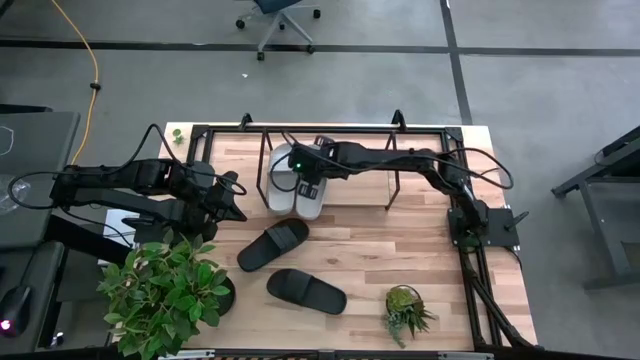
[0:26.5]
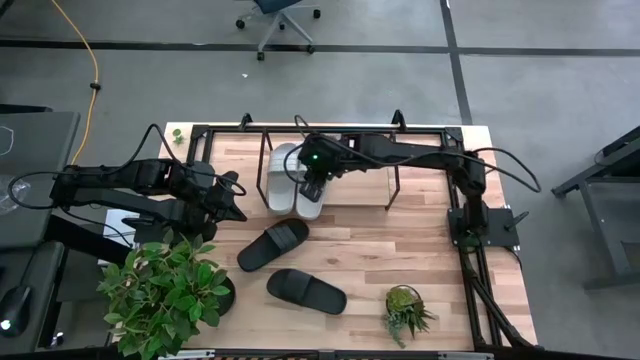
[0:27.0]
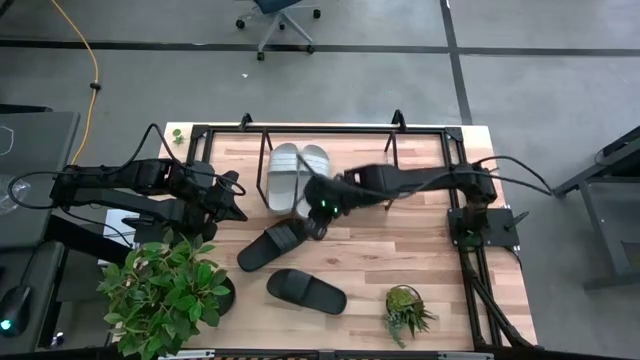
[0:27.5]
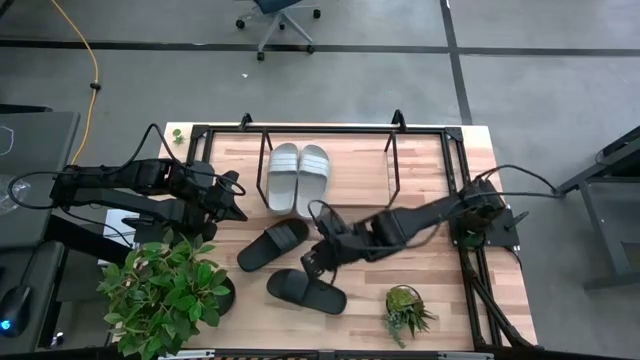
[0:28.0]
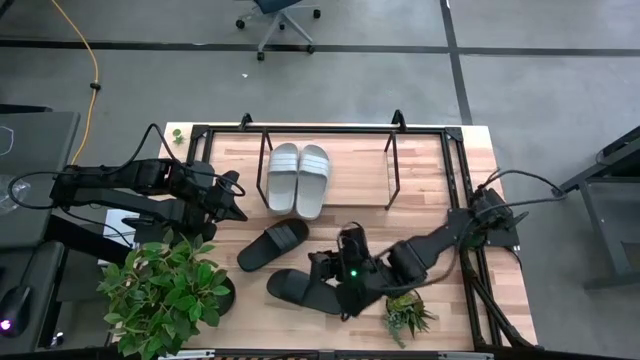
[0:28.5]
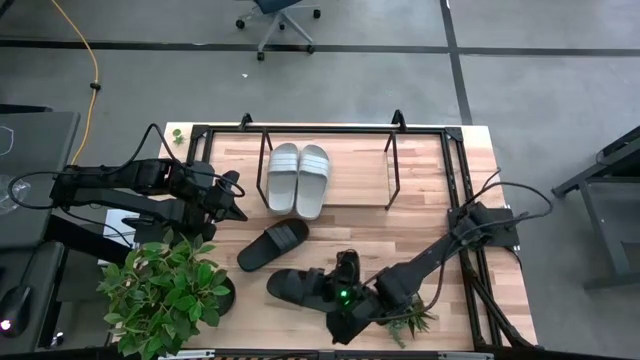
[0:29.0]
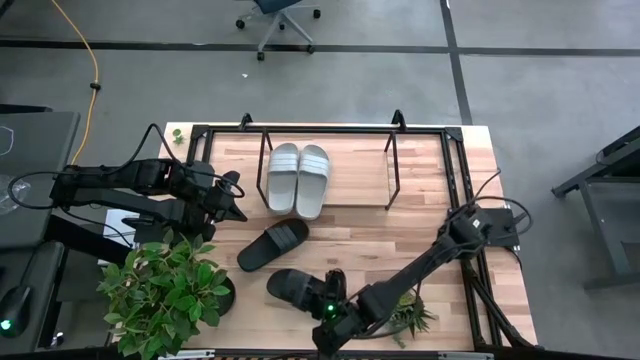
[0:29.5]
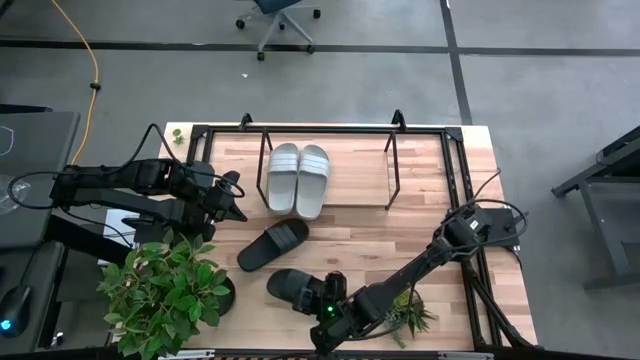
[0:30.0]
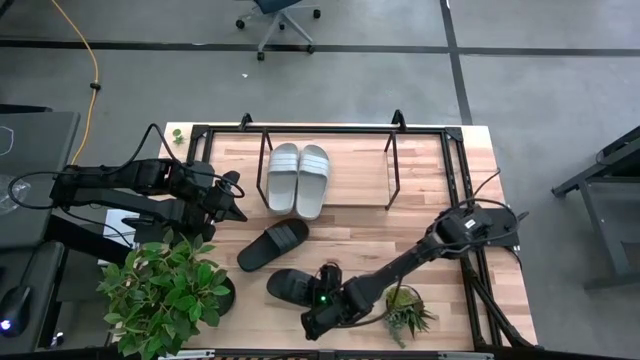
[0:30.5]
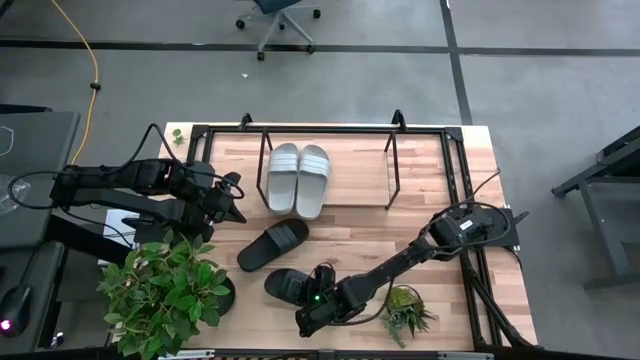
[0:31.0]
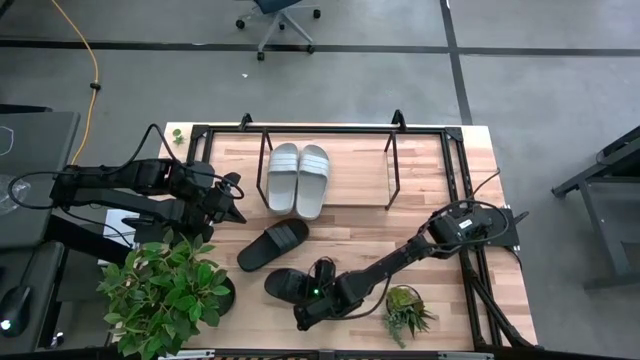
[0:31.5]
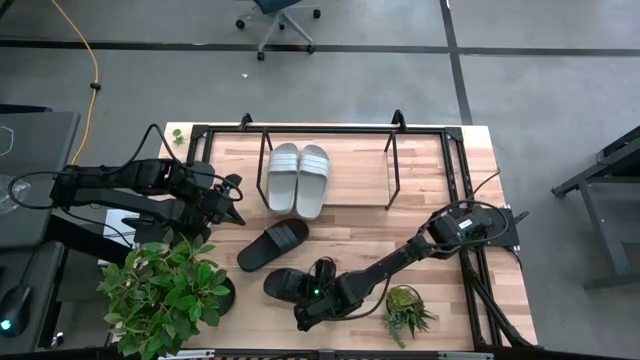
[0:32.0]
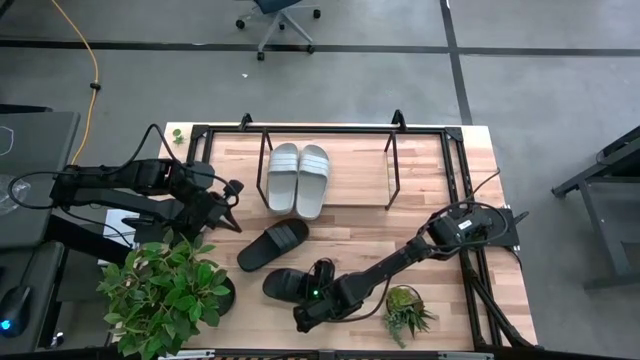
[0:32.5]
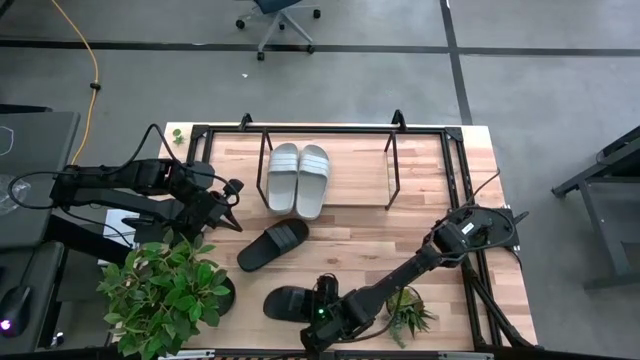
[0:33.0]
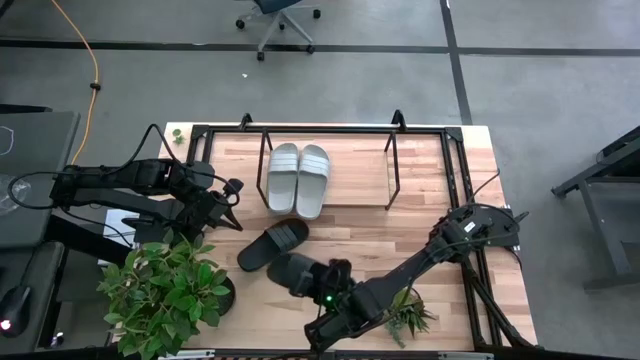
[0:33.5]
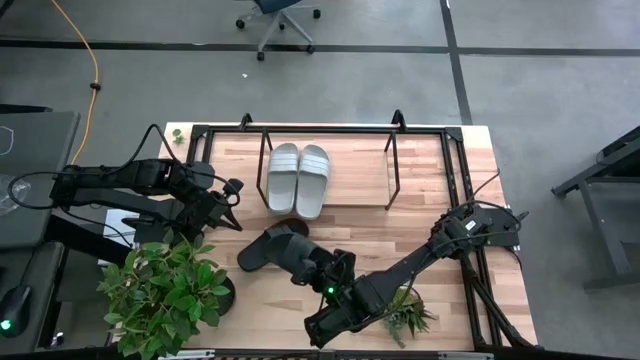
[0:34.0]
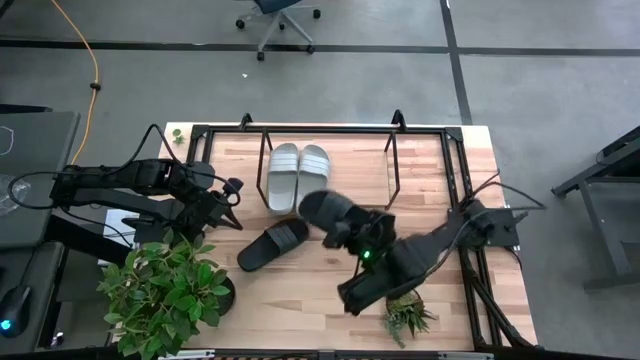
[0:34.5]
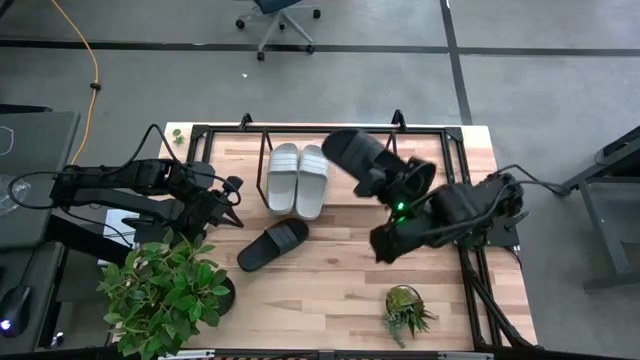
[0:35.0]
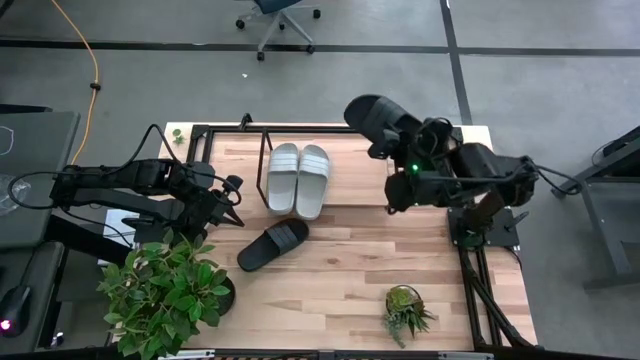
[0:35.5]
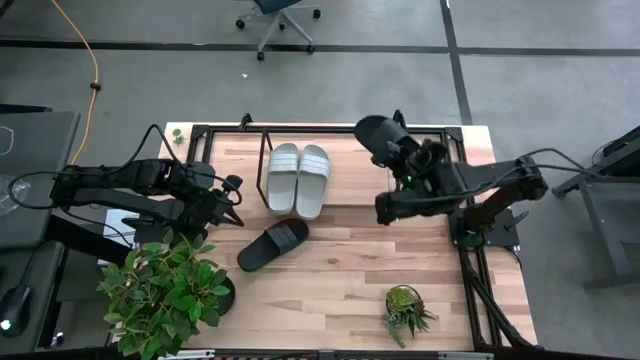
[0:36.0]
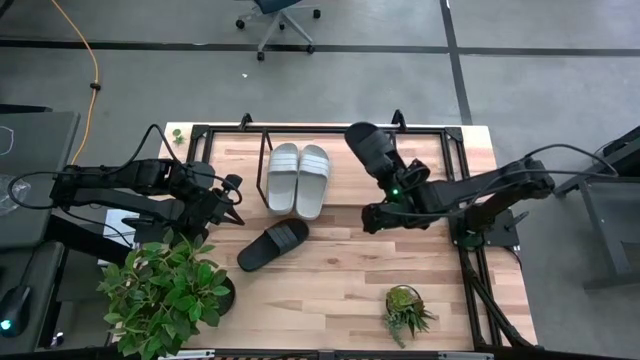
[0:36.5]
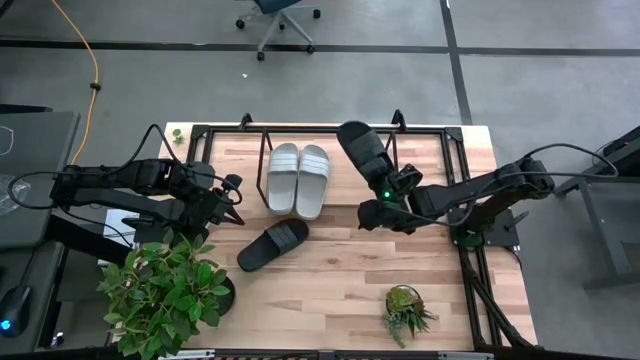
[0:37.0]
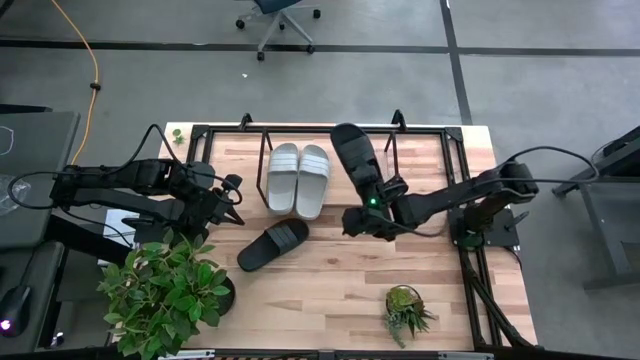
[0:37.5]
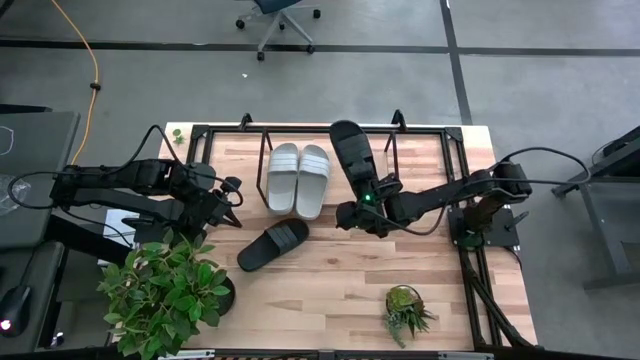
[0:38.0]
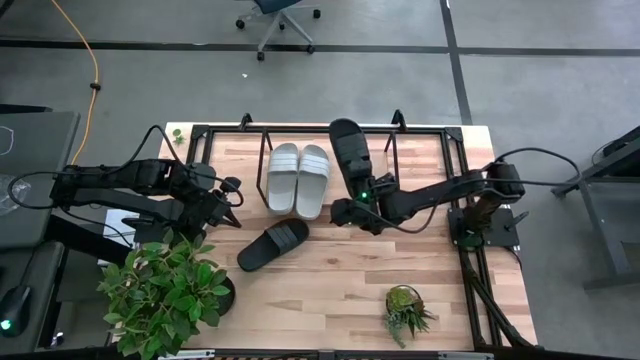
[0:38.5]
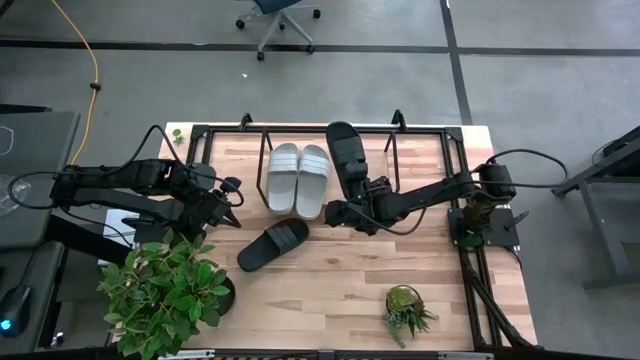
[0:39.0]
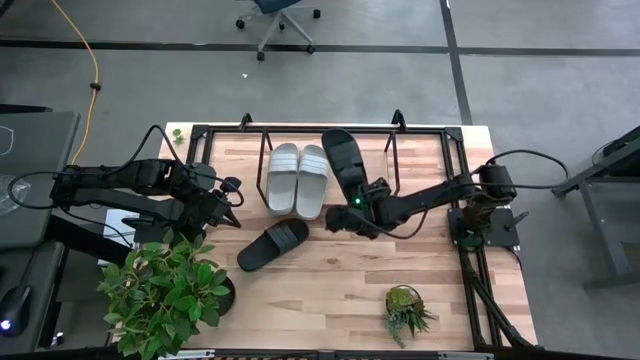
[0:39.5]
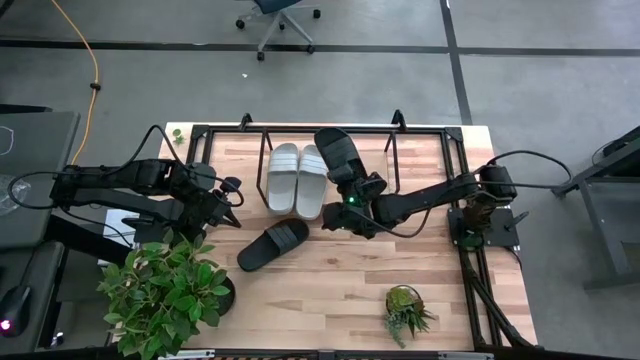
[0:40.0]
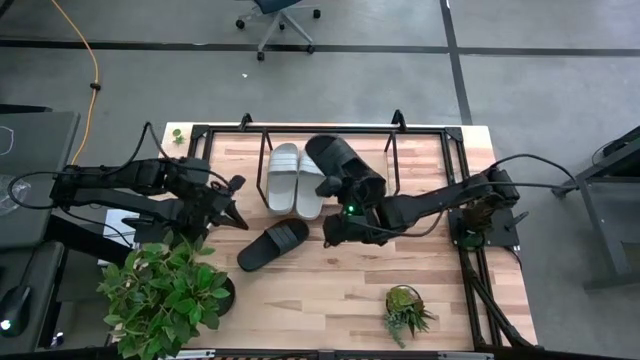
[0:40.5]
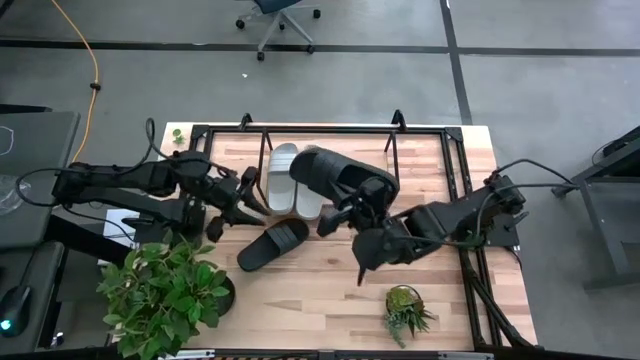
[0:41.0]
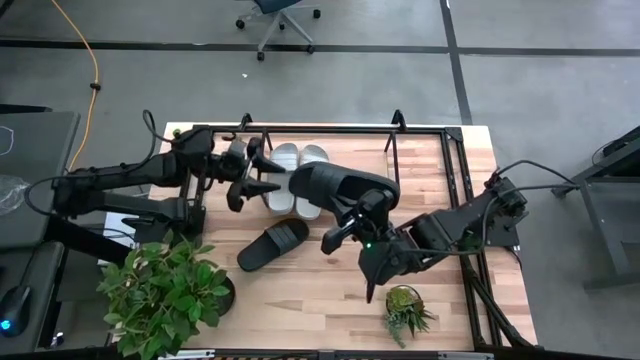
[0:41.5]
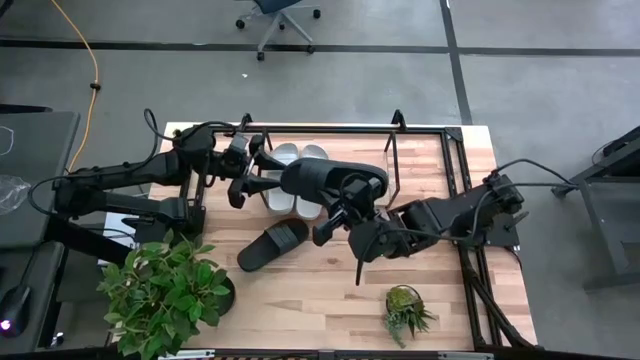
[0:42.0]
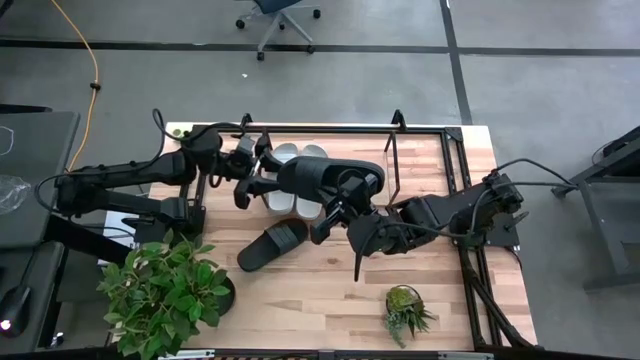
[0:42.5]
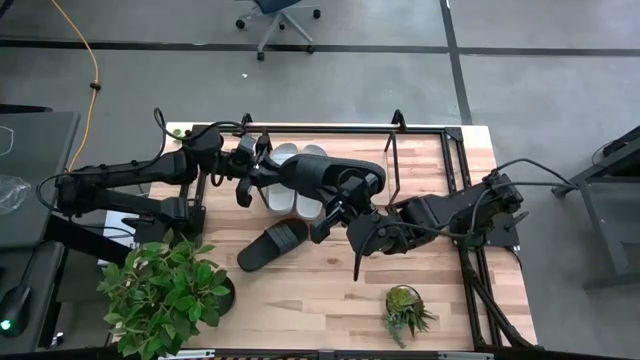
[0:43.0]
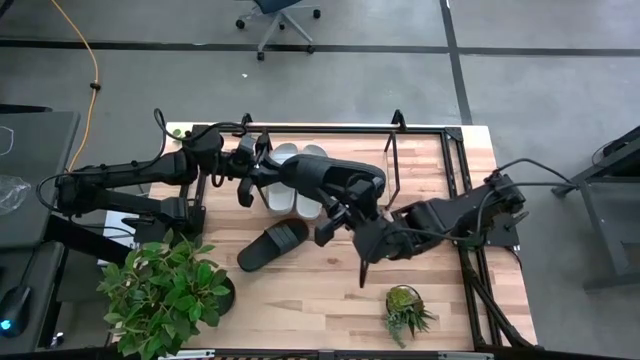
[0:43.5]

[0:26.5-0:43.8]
Task: Pick and place slides into the shelf
Put the bottom black slide on the shelf

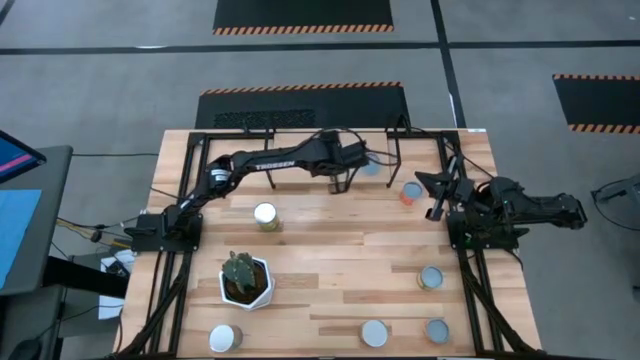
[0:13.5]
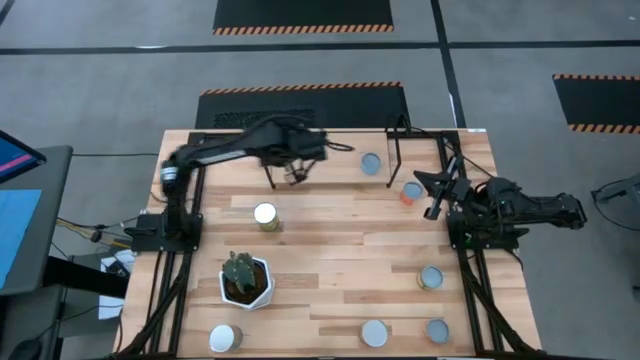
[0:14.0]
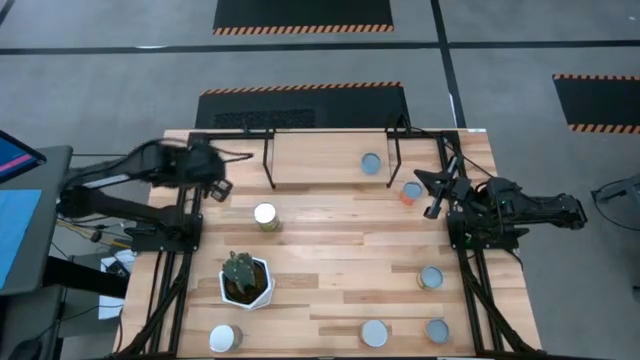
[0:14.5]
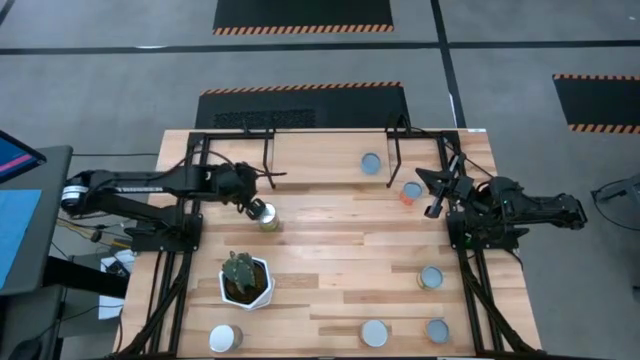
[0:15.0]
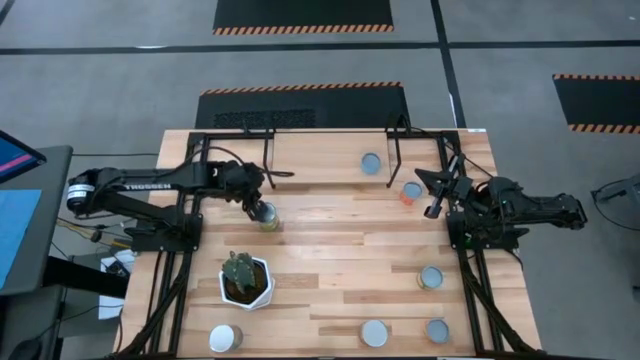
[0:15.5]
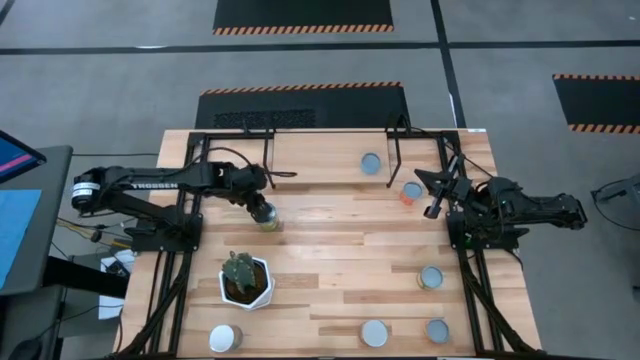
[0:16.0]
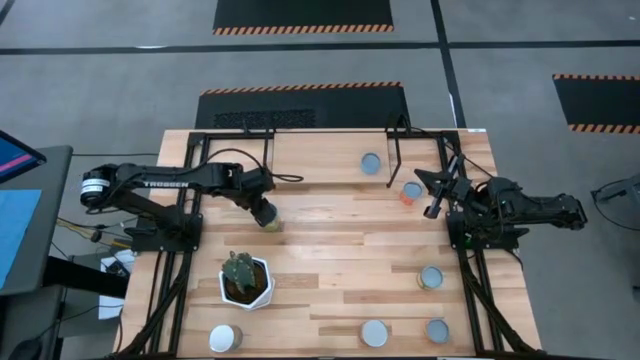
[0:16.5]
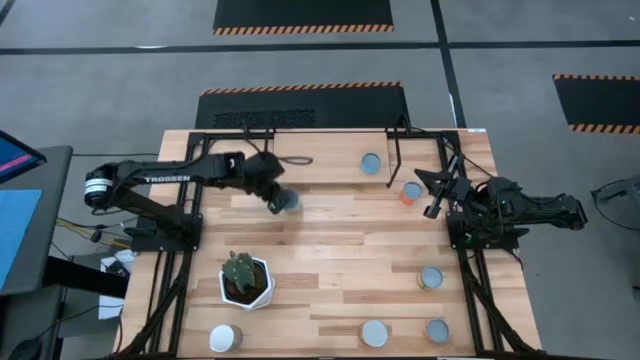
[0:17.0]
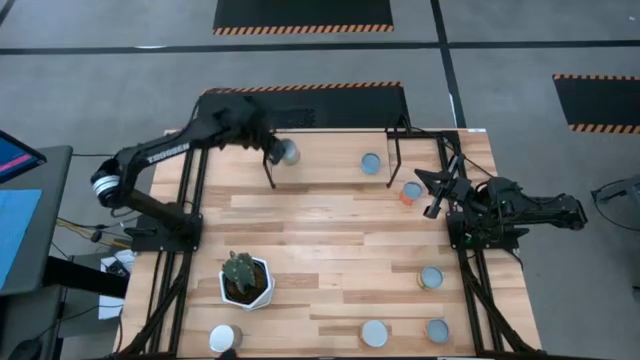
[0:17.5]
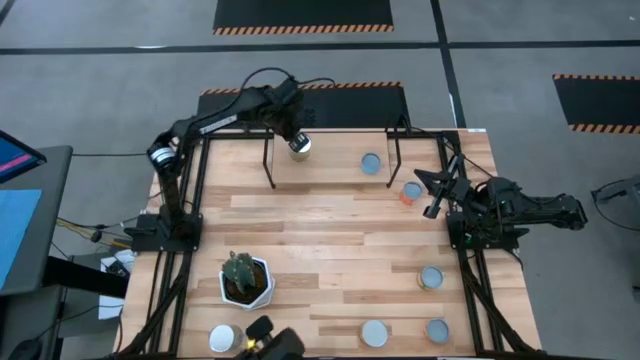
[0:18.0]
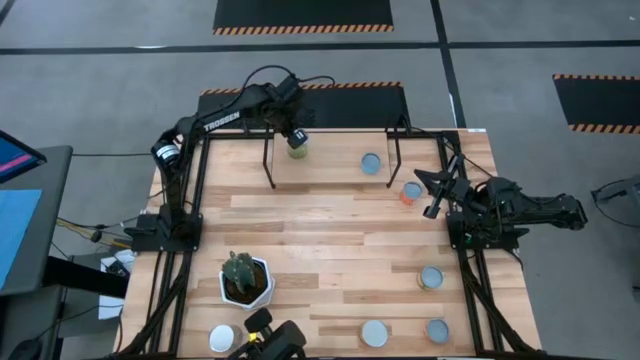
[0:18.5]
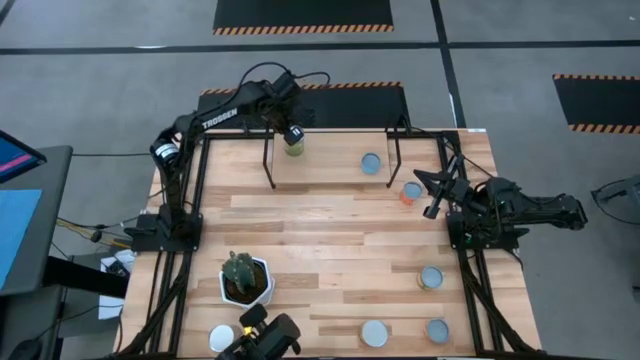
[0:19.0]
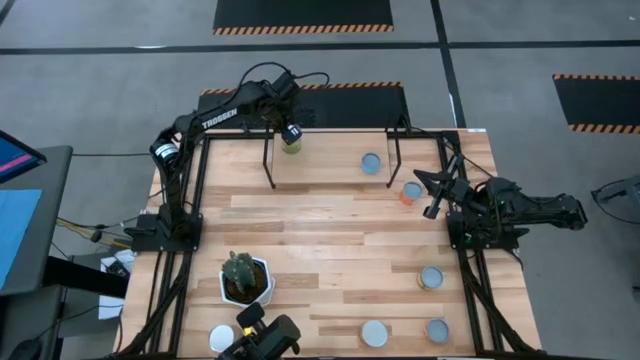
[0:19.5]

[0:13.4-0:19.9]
Task: Pick and place cans onto a shelf
Put the canned pears on the shelf
